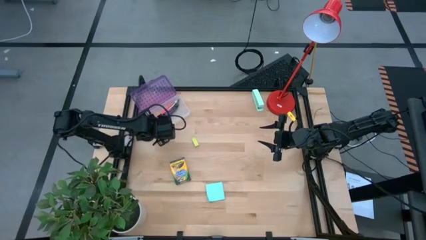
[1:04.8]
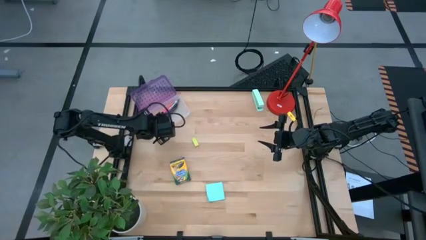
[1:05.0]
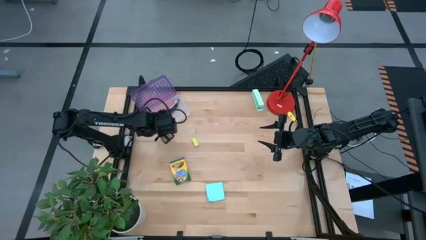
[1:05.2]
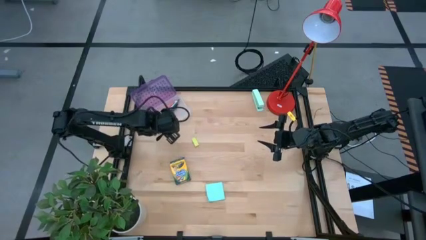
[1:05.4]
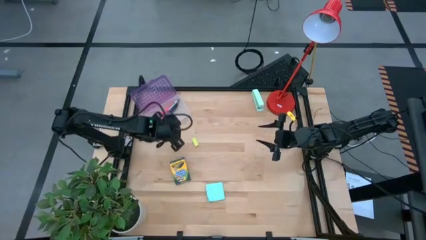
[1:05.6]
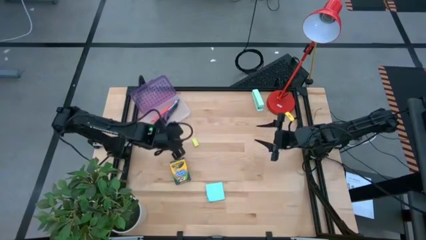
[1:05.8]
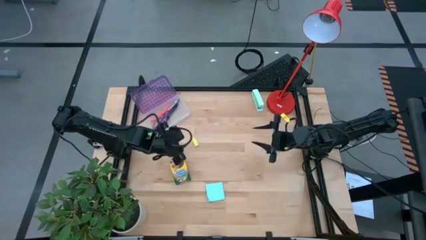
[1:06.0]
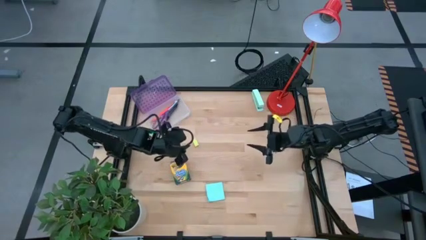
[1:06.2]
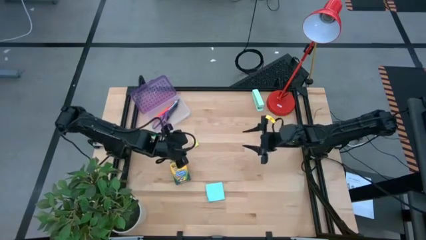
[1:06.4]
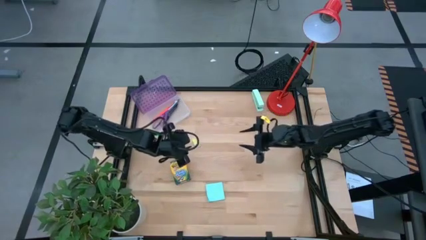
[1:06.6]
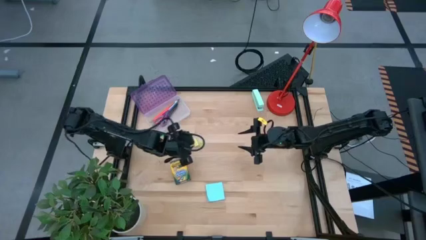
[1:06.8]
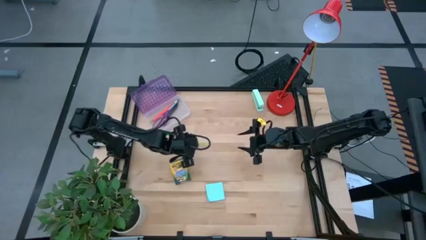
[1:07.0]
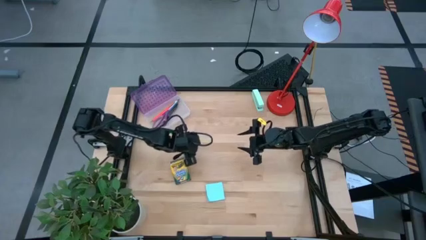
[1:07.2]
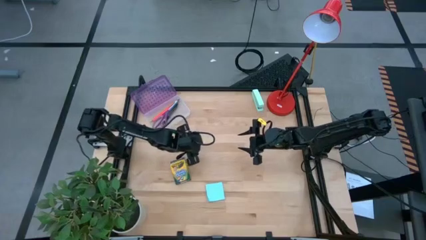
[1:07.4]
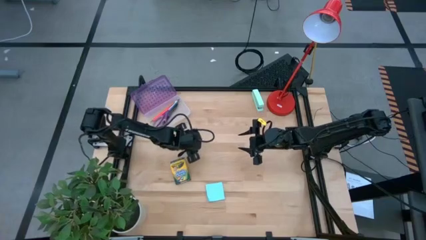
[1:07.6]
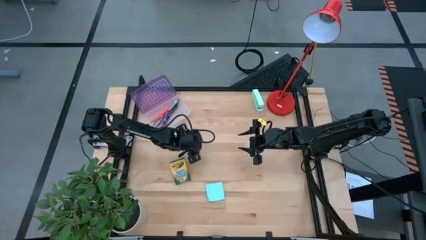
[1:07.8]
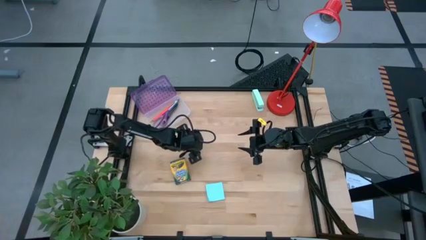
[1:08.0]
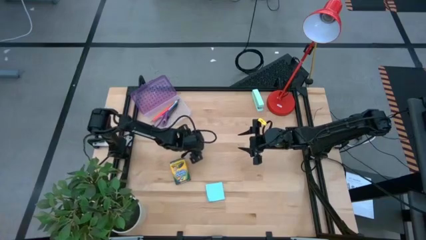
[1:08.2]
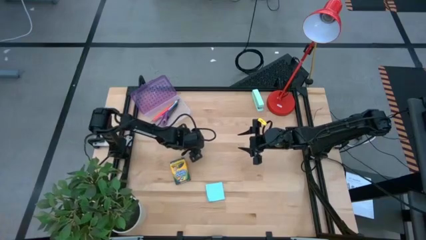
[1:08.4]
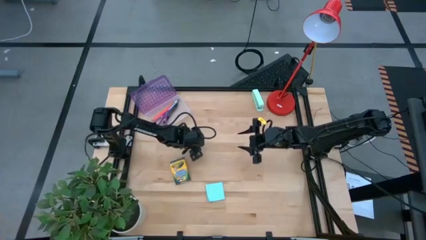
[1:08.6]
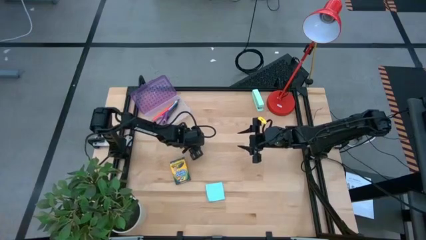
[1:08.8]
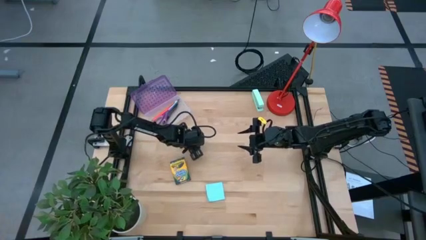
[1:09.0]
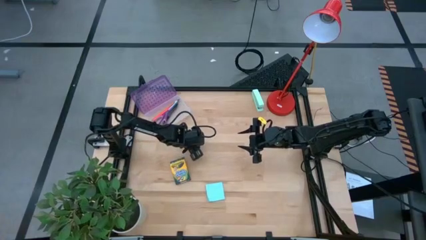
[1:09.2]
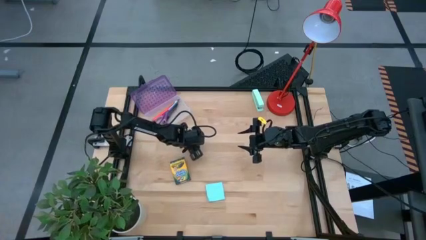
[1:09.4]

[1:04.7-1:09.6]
Task: Pack school essentials
Put the yellow eraser into the purple supply box

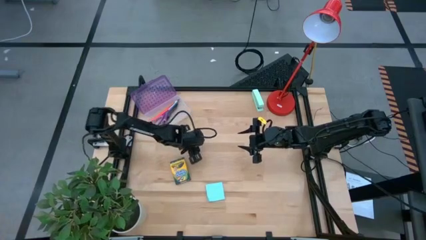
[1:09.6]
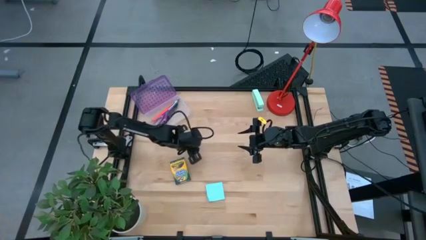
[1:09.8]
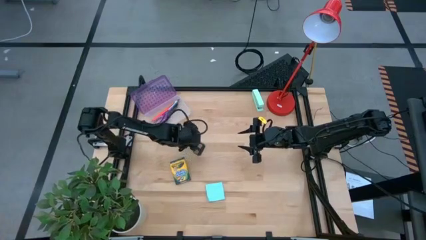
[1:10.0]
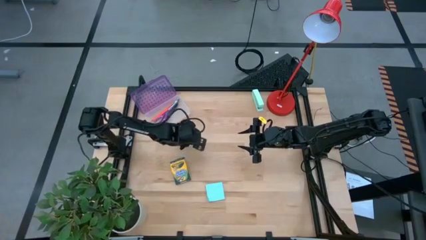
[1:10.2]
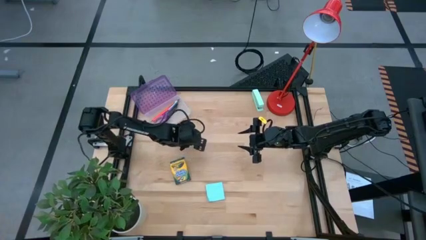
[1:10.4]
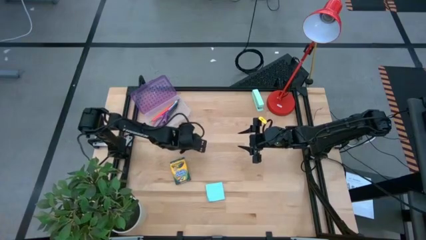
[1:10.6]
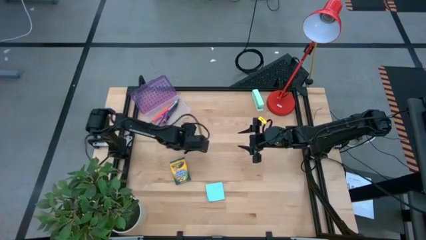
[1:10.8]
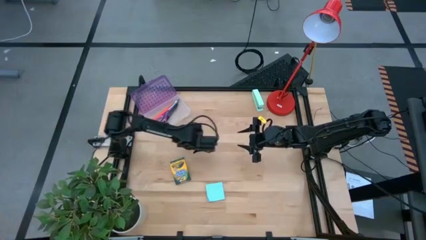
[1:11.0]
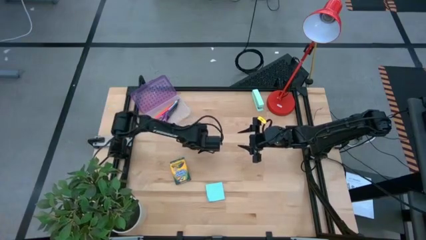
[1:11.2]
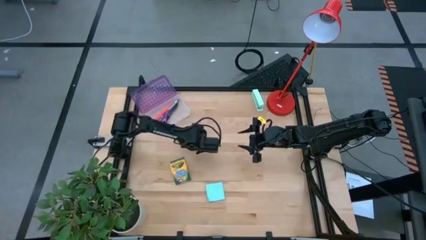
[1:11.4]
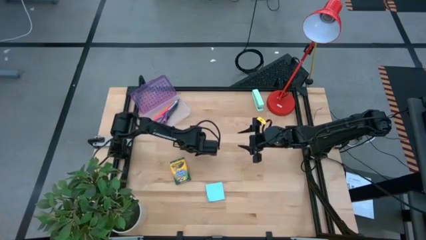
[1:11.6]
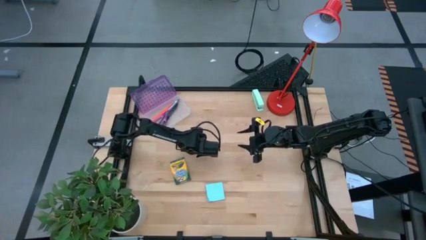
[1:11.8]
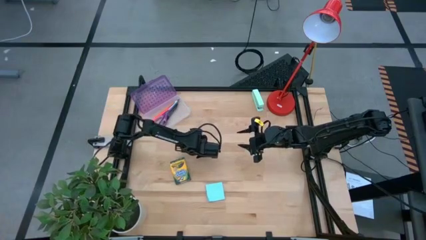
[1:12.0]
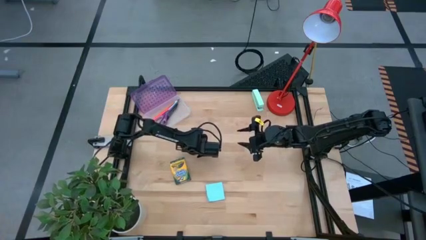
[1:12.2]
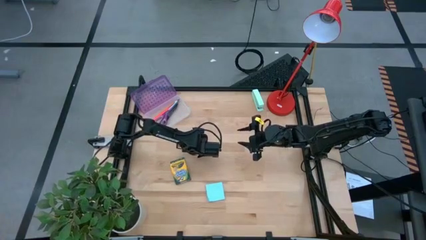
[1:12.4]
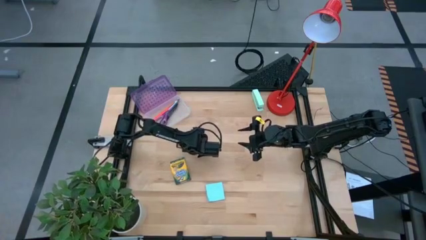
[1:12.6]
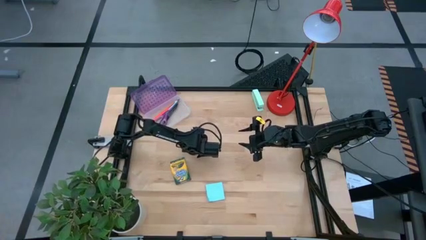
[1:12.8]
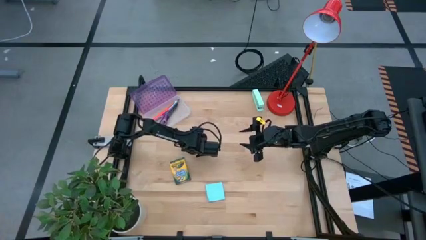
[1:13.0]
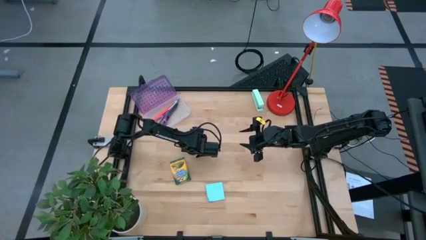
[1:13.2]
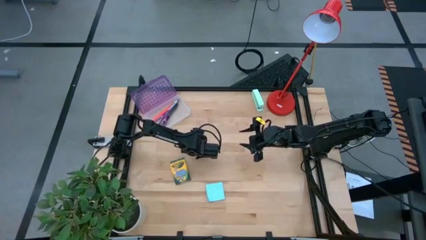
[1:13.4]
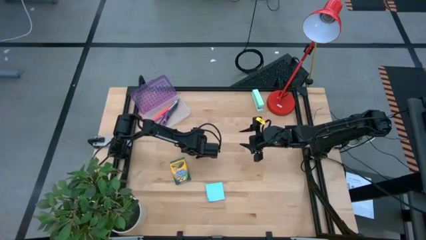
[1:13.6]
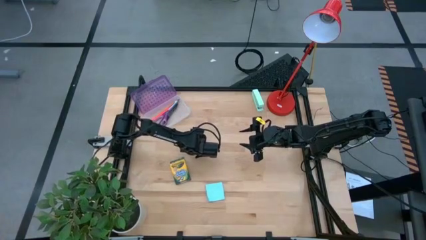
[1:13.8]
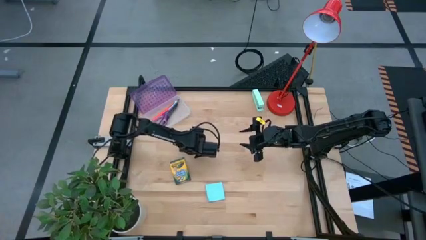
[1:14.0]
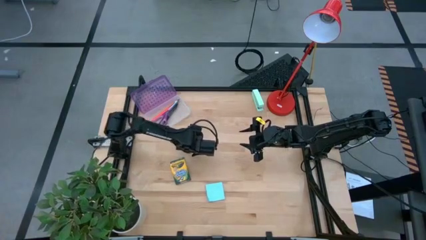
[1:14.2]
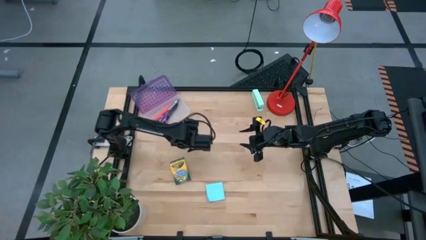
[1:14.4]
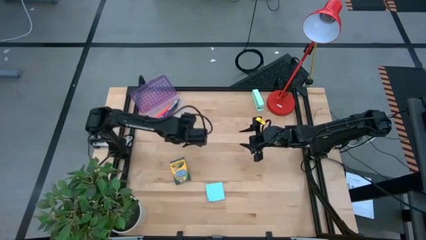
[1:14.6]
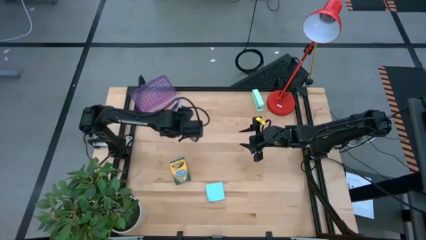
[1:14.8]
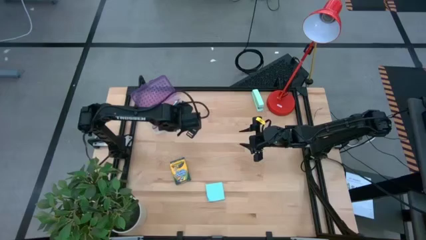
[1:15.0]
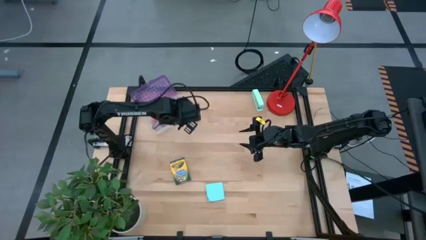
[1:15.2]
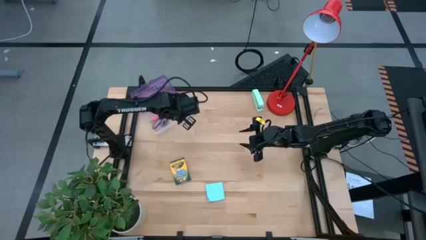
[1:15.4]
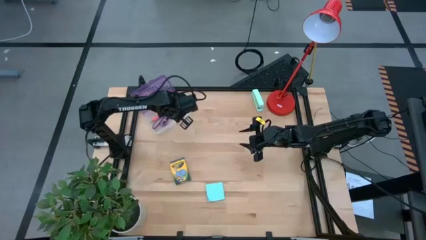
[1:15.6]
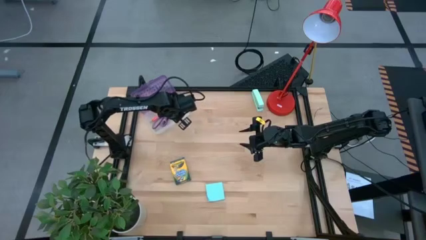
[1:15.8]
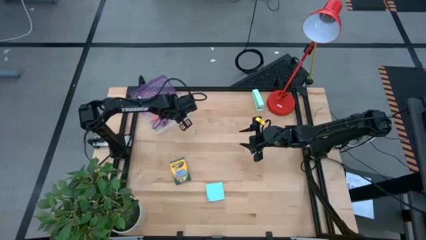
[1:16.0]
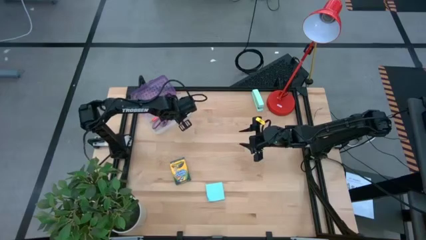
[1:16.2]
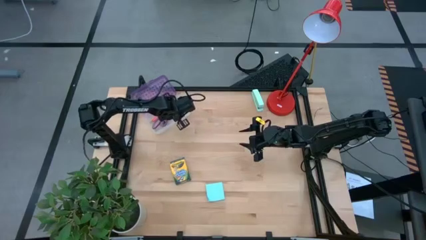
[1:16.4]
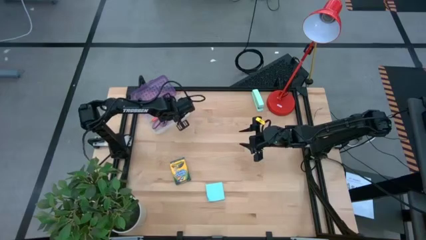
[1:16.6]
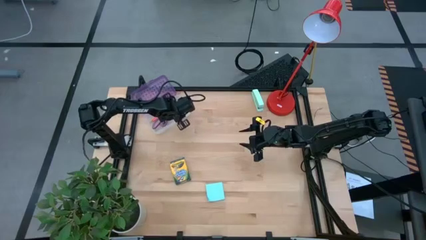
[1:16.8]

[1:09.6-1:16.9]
Put the yellow eraser into the purple supply box
